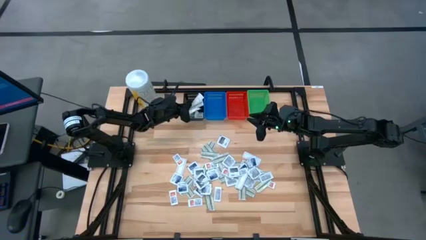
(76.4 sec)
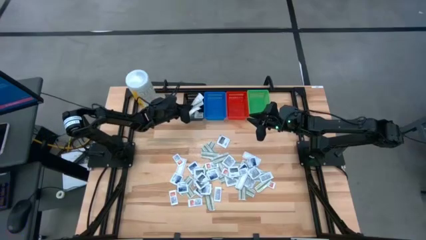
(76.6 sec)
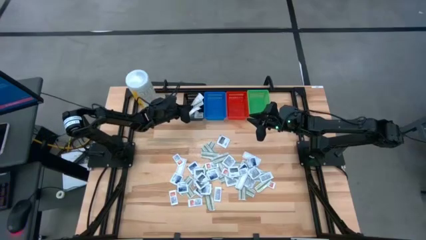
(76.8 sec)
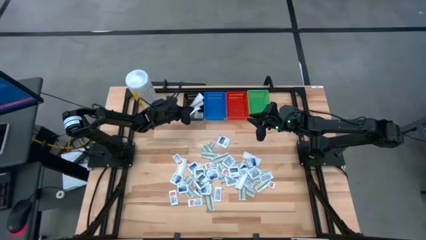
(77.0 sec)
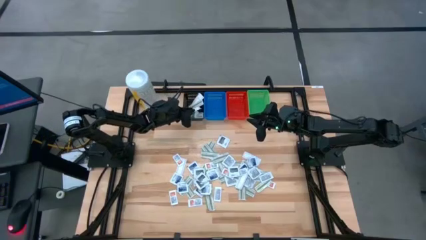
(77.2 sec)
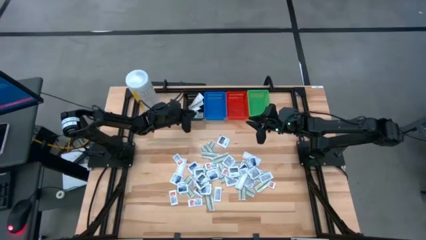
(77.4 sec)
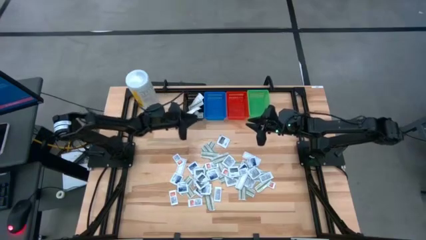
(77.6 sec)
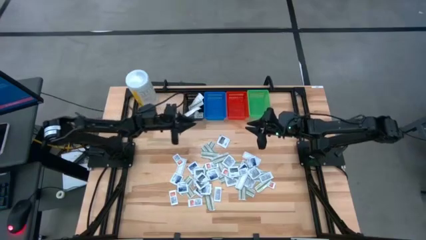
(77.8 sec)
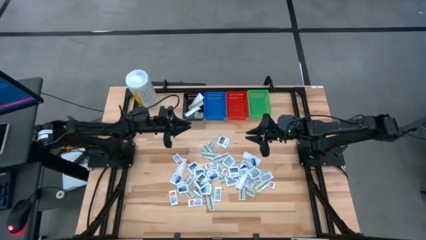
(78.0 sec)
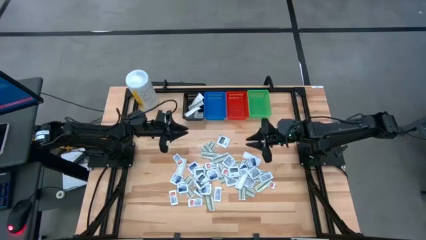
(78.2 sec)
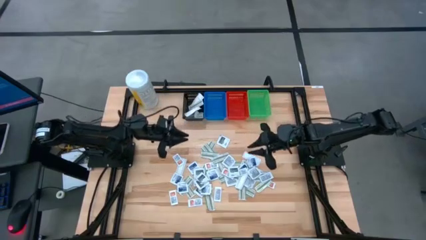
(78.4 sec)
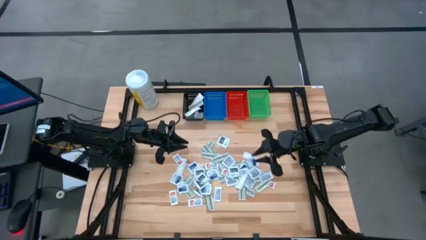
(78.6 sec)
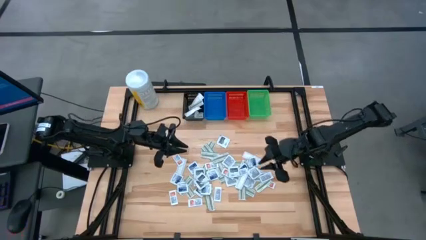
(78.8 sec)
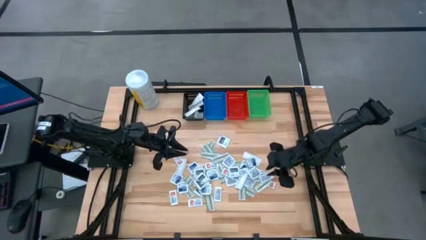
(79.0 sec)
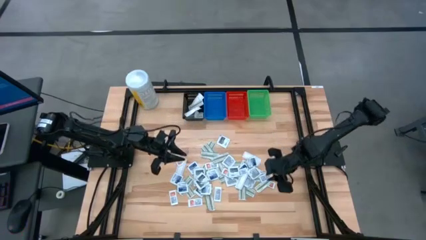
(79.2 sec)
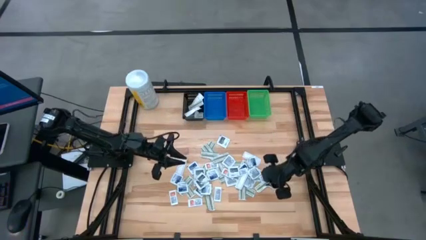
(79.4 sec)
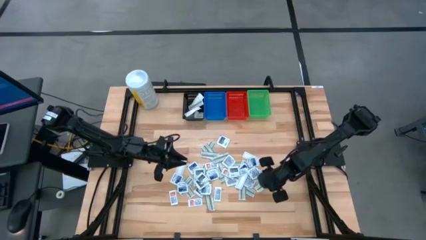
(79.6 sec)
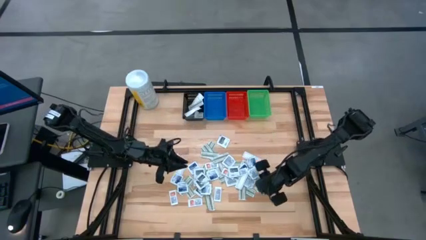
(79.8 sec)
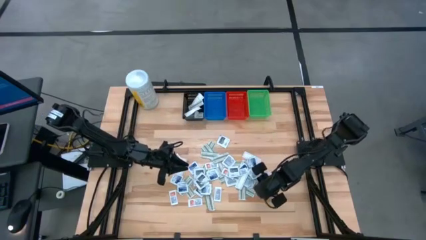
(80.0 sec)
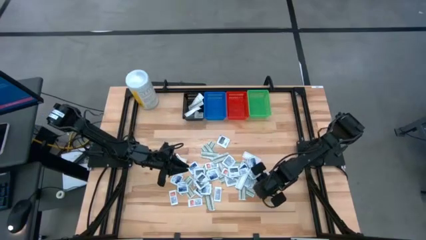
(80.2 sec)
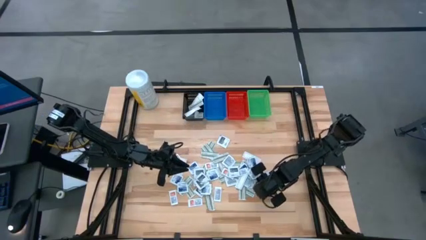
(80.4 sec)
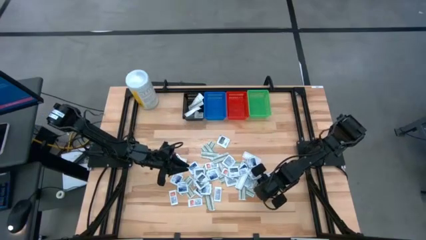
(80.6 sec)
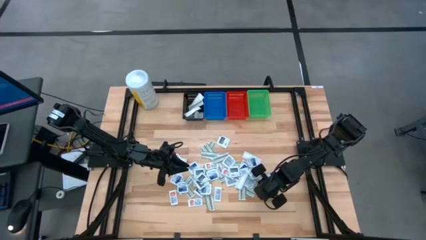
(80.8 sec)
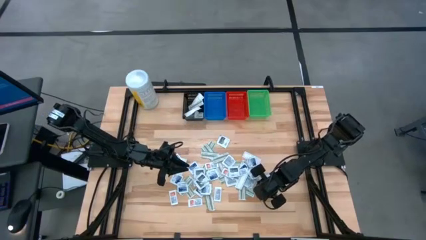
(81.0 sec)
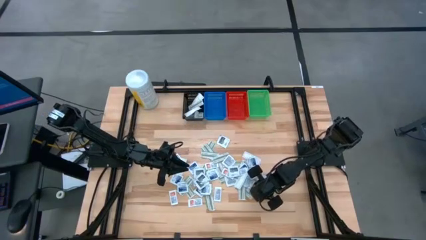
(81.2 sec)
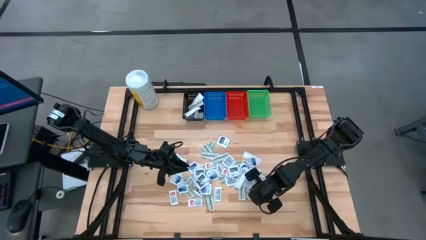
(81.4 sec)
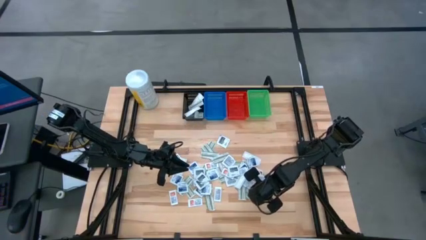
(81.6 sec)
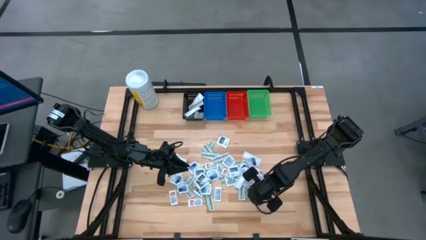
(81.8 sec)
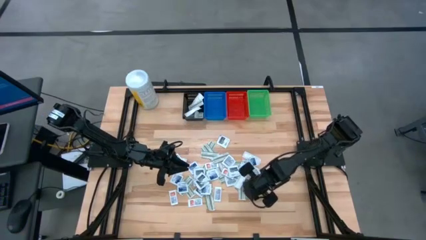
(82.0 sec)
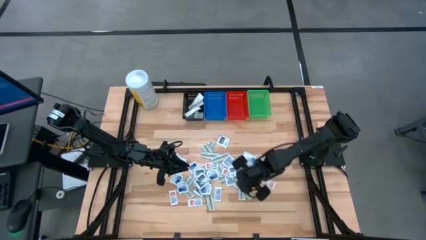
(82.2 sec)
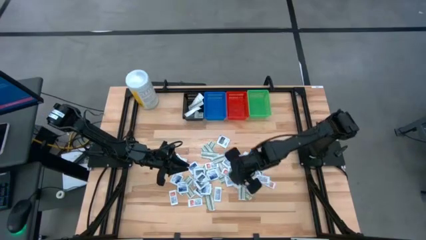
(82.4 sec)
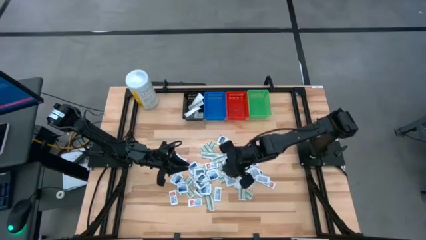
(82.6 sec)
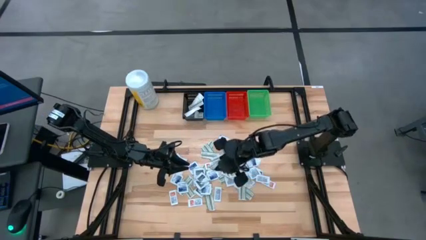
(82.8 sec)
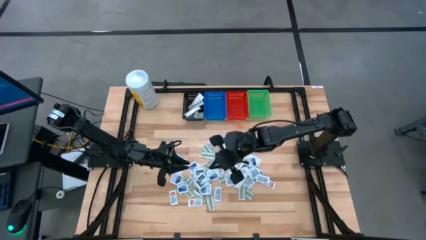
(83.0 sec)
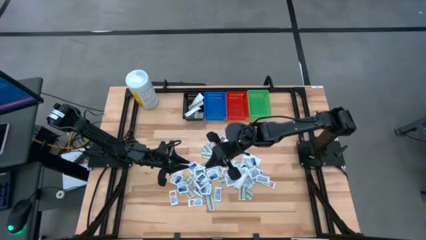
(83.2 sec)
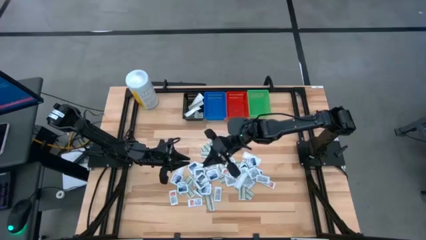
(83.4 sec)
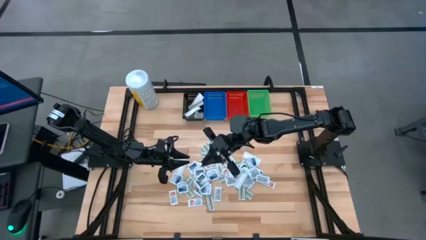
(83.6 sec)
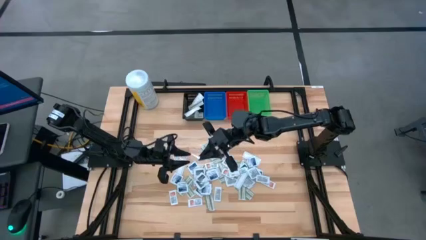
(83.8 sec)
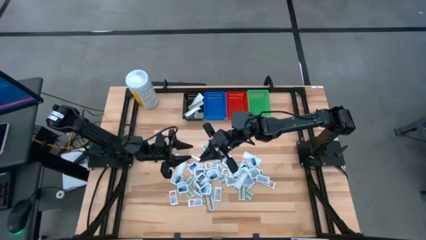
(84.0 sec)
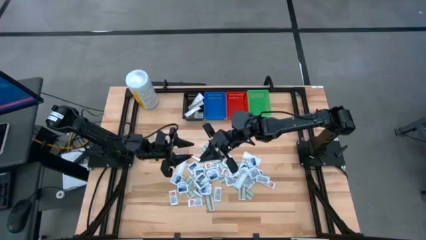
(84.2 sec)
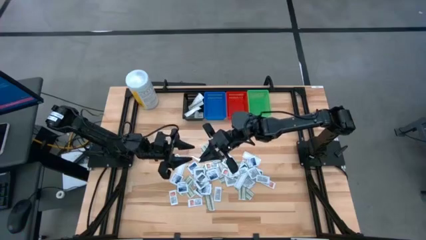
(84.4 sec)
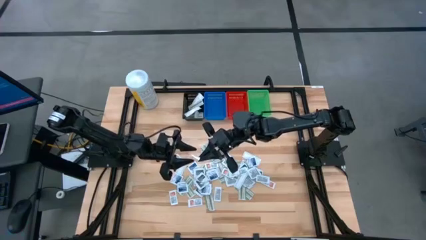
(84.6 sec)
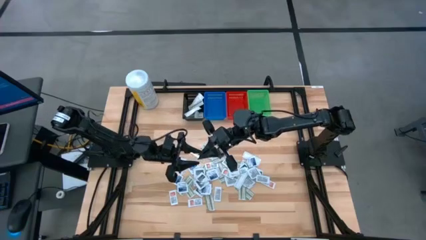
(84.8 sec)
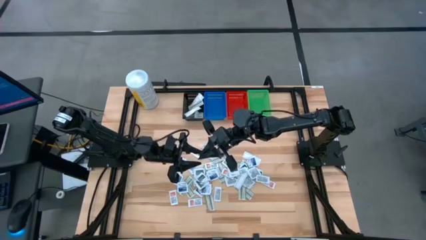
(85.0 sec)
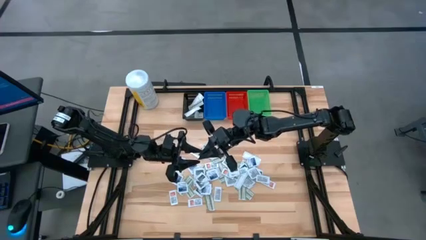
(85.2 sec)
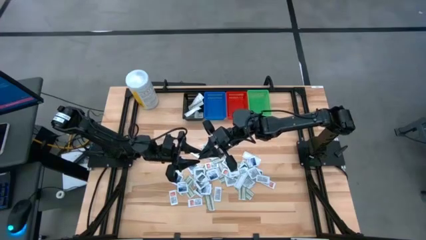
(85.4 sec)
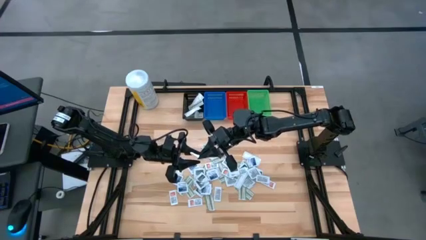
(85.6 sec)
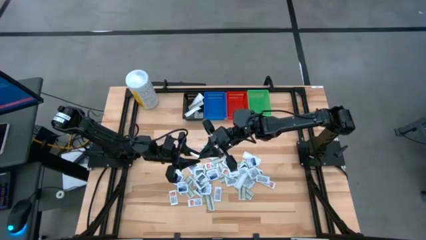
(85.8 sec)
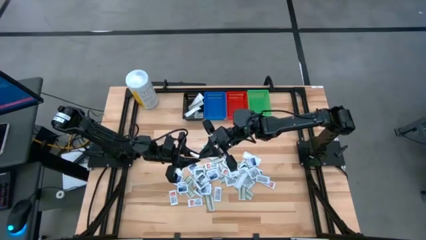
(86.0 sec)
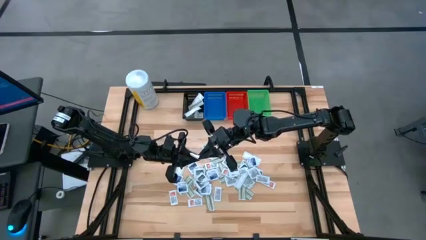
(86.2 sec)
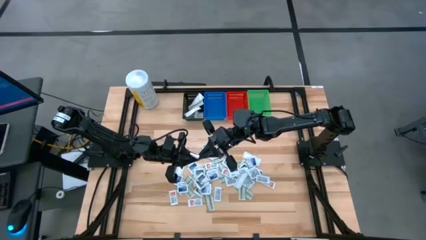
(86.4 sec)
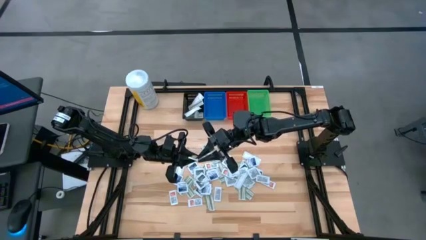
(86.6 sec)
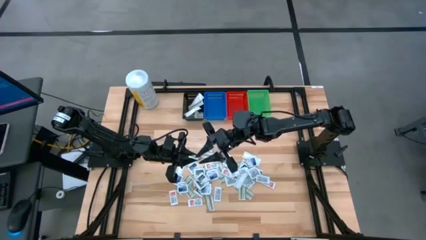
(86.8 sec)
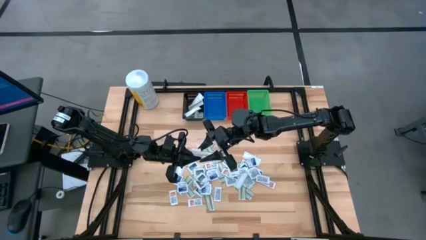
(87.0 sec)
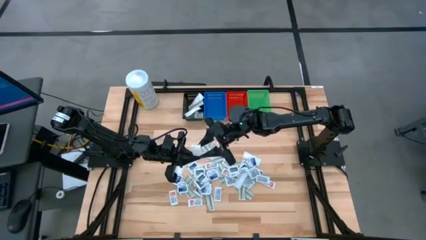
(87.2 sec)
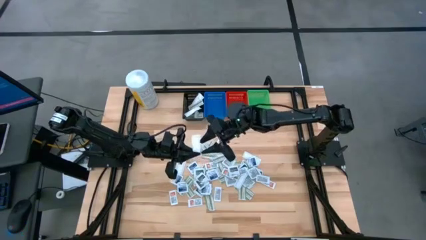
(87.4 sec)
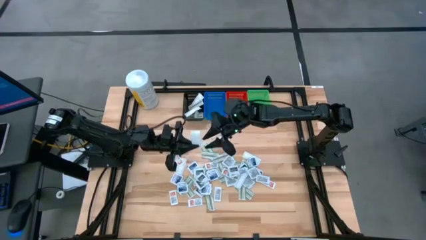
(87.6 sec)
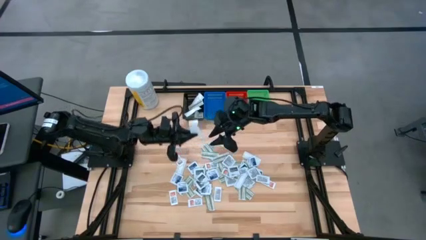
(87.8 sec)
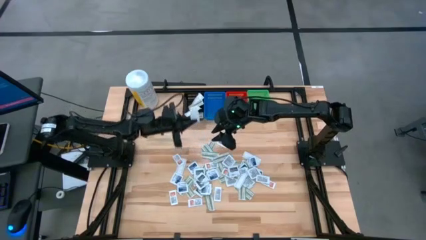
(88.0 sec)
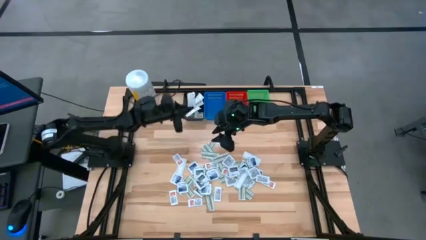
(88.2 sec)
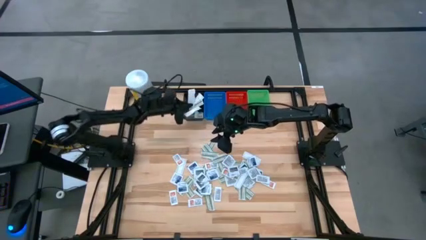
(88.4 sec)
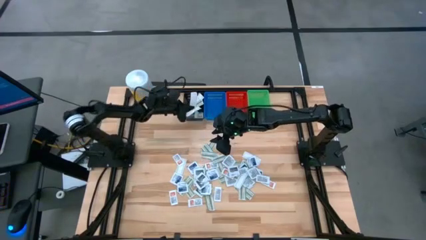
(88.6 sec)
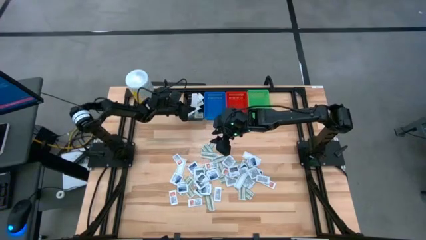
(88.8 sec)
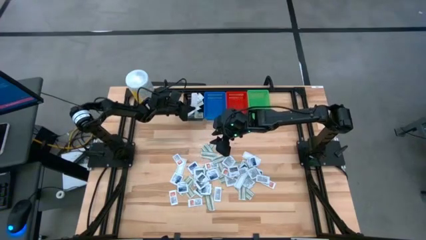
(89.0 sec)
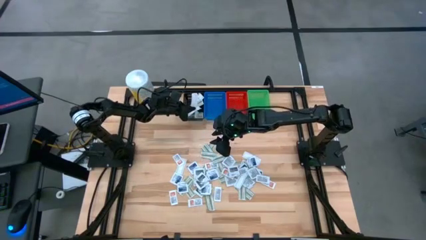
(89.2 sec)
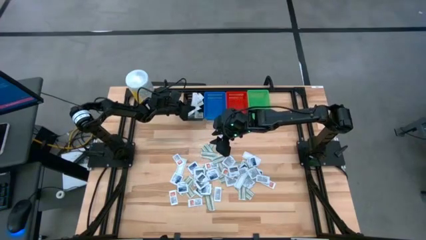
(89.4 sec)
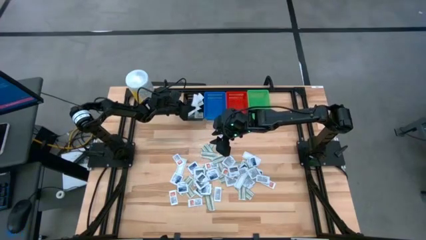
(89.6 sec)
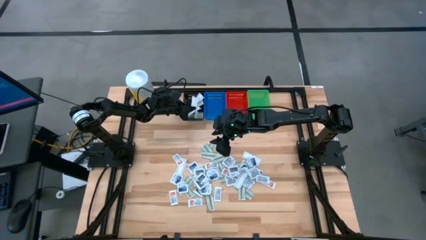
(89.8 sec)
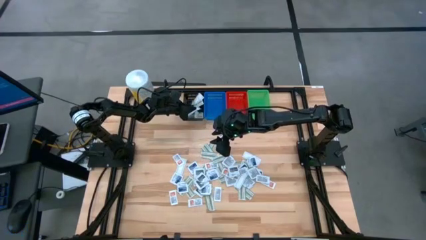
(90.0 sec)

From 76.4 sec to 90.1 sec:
Task: Pick & Place First Aid Supplies
Put the green bandage pack in the black bin
